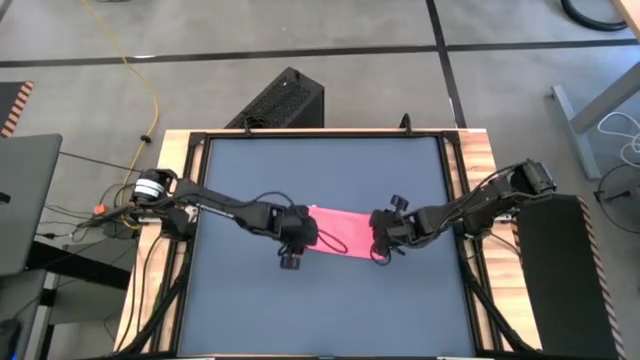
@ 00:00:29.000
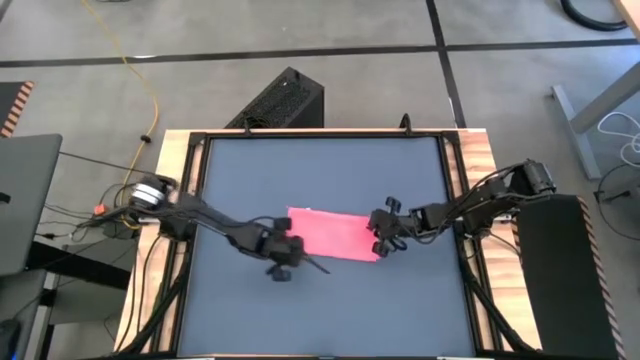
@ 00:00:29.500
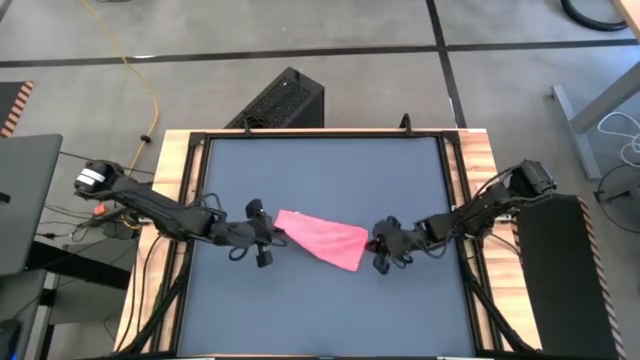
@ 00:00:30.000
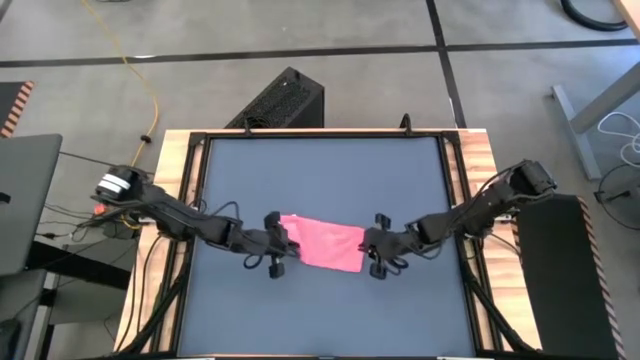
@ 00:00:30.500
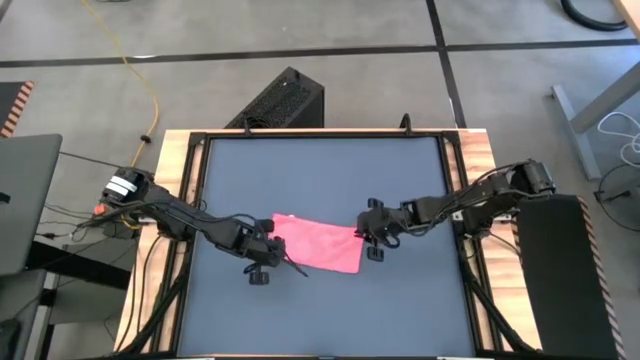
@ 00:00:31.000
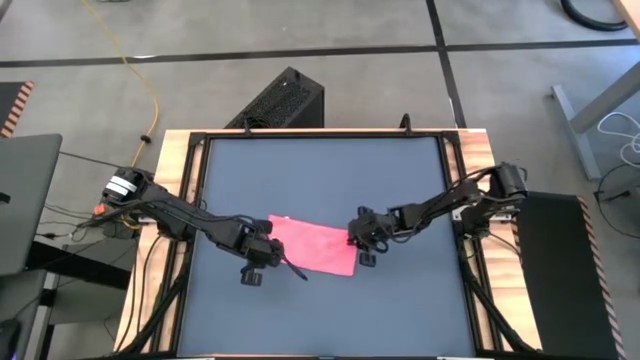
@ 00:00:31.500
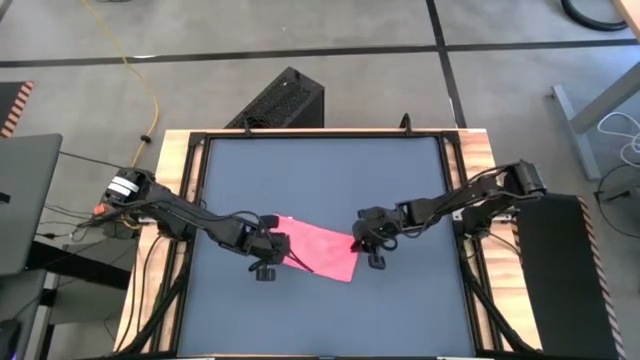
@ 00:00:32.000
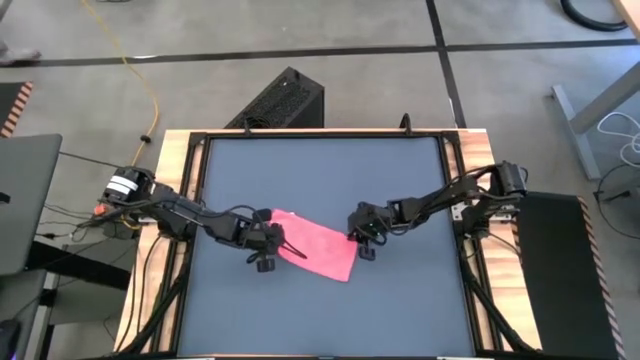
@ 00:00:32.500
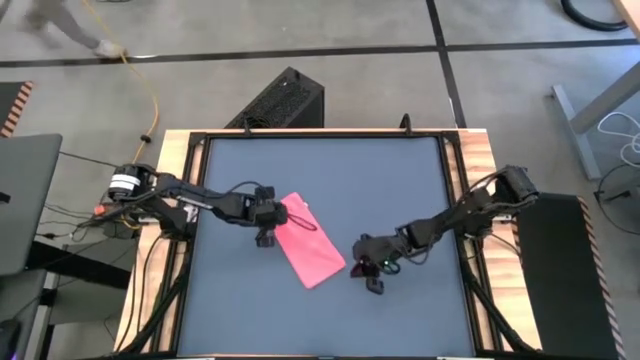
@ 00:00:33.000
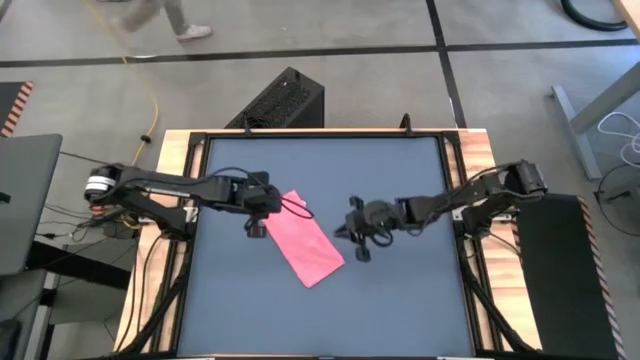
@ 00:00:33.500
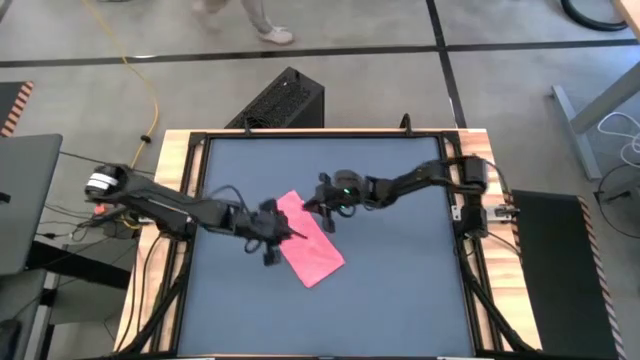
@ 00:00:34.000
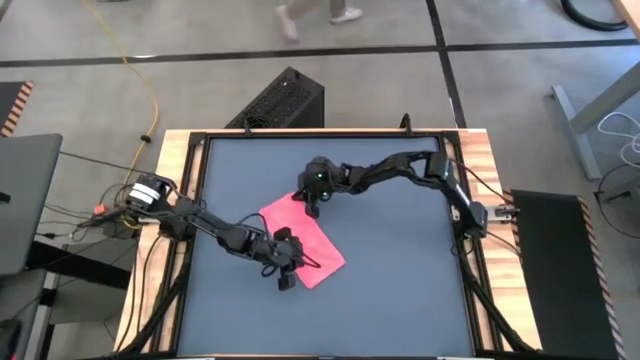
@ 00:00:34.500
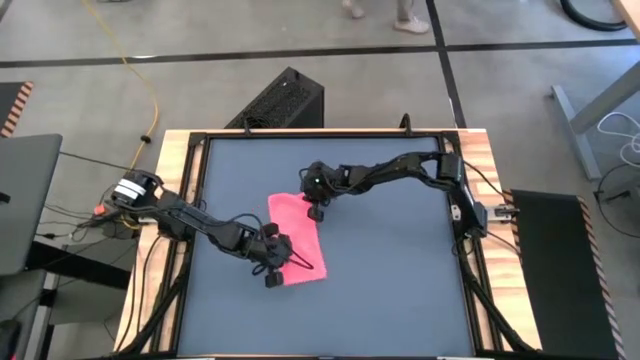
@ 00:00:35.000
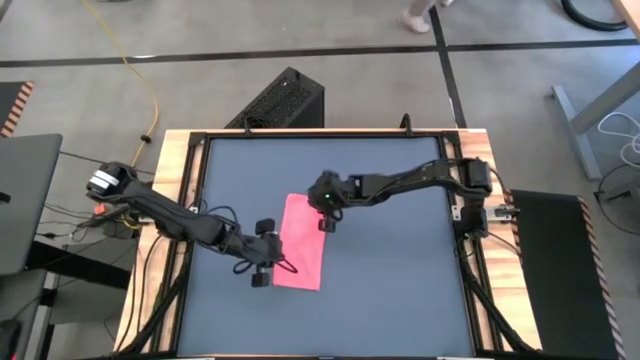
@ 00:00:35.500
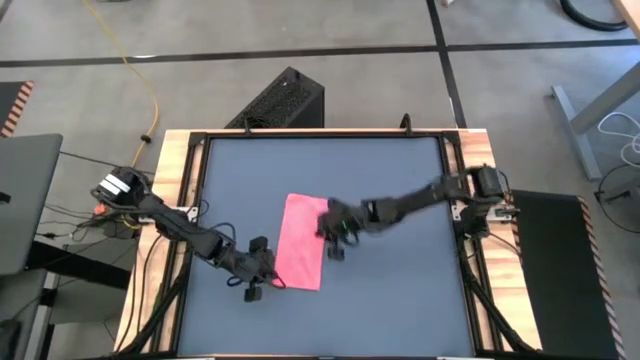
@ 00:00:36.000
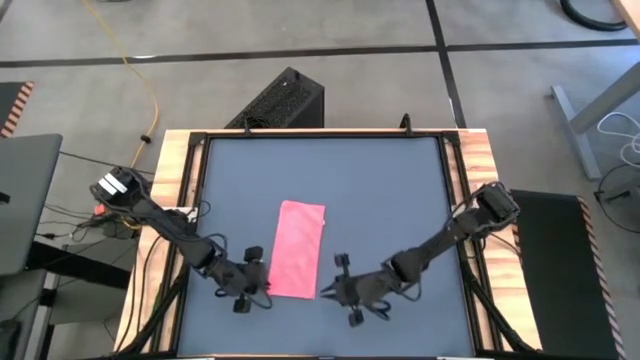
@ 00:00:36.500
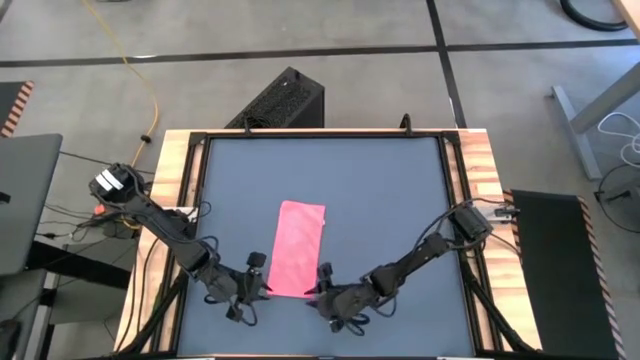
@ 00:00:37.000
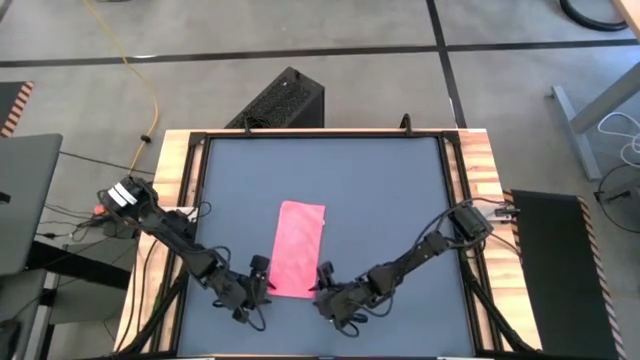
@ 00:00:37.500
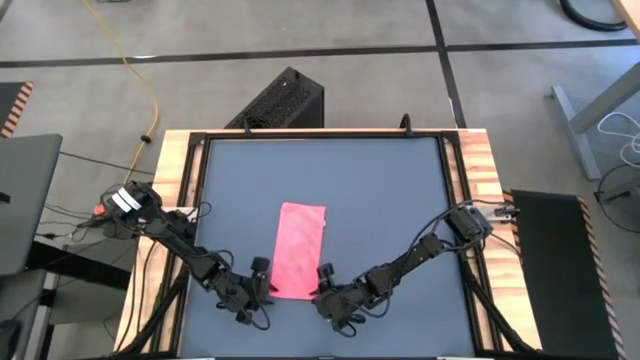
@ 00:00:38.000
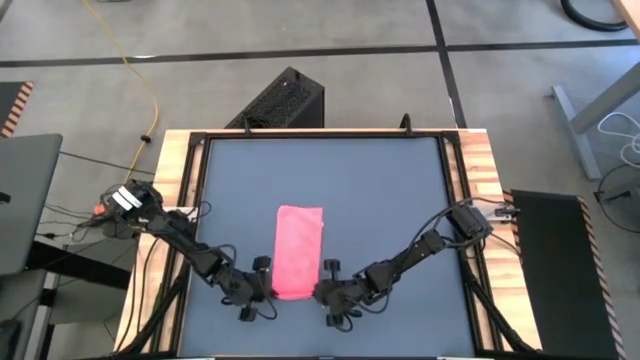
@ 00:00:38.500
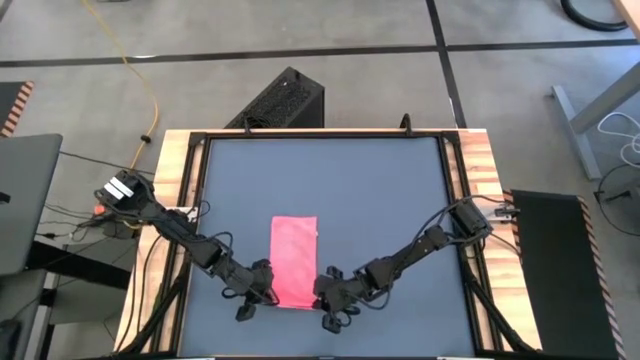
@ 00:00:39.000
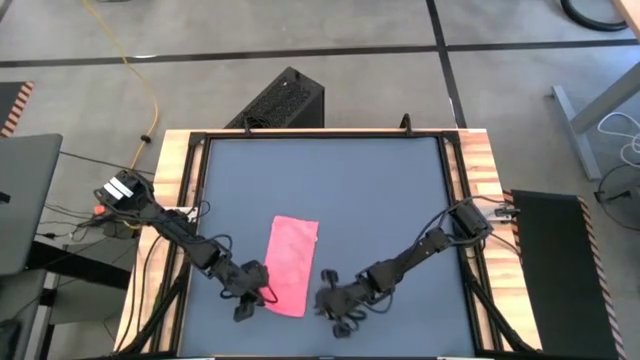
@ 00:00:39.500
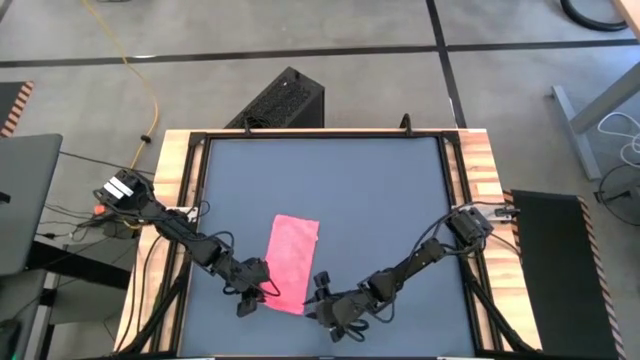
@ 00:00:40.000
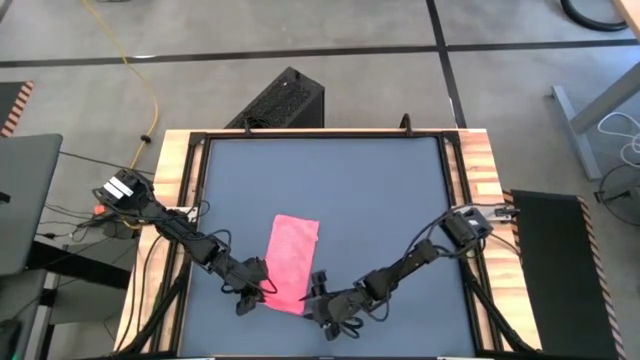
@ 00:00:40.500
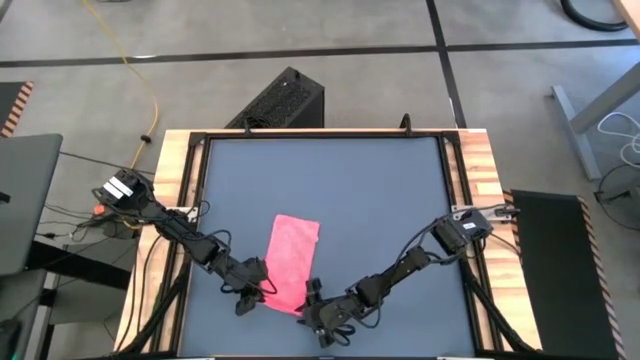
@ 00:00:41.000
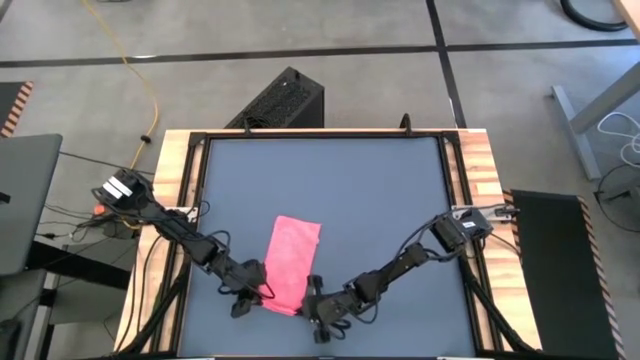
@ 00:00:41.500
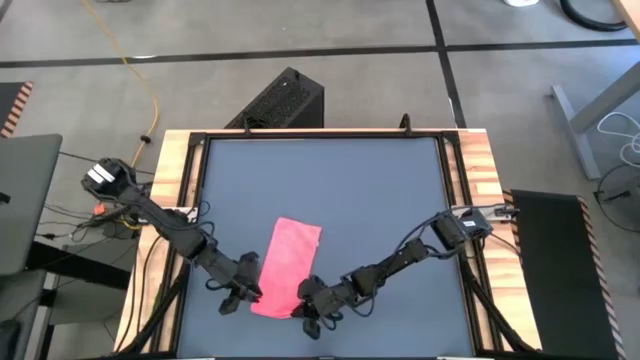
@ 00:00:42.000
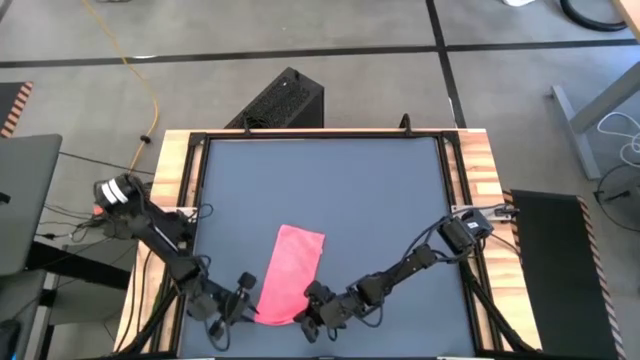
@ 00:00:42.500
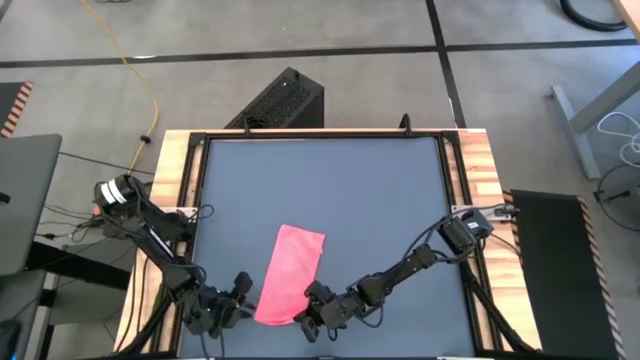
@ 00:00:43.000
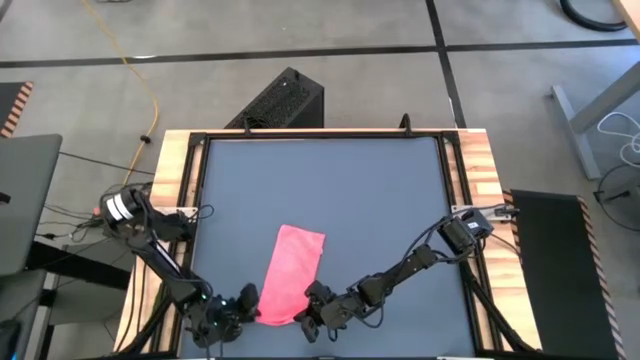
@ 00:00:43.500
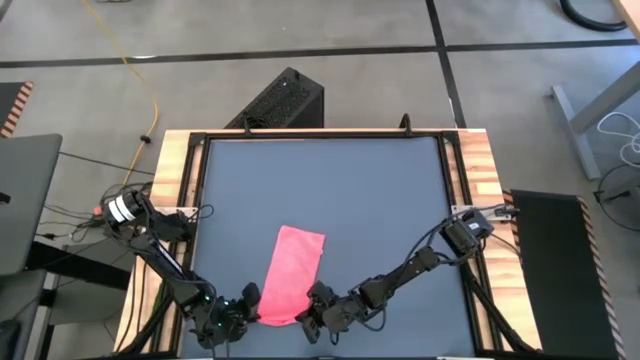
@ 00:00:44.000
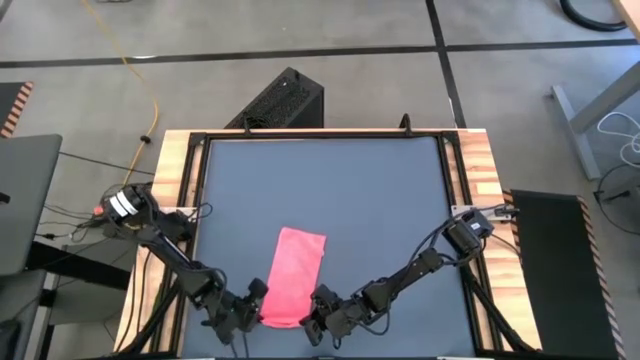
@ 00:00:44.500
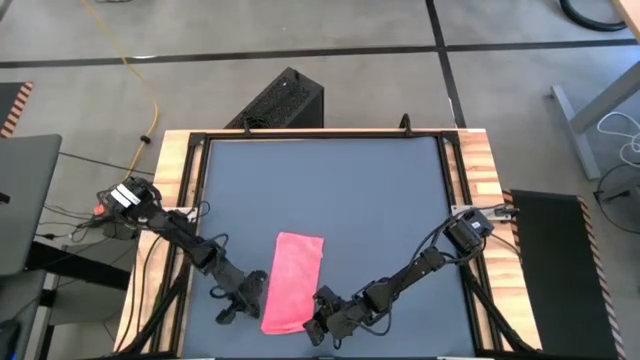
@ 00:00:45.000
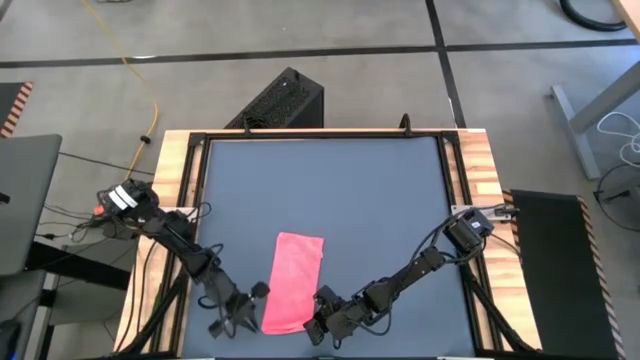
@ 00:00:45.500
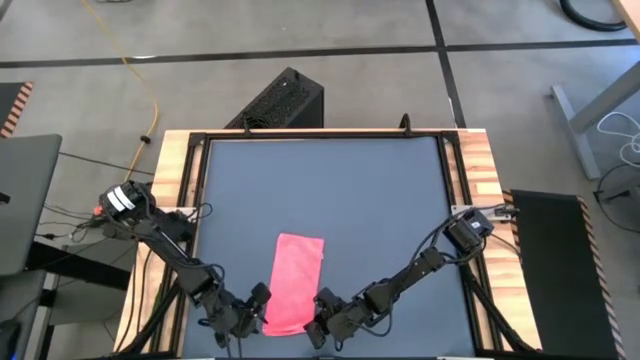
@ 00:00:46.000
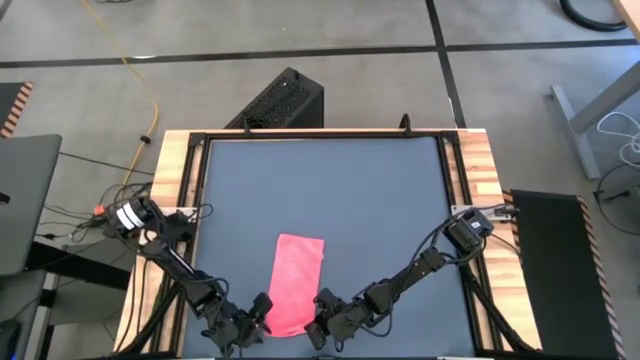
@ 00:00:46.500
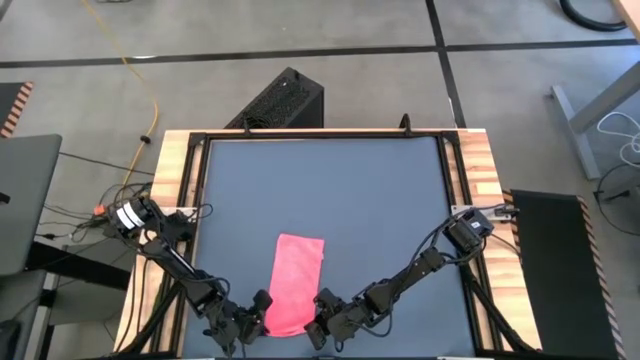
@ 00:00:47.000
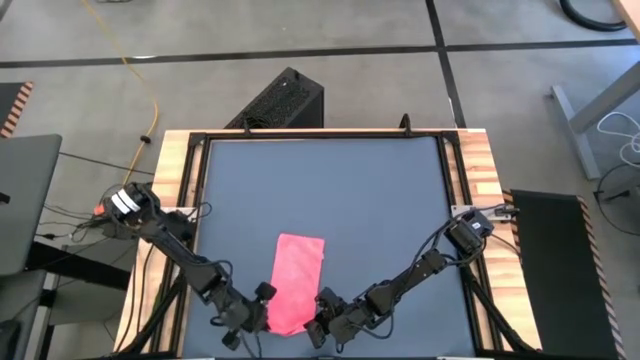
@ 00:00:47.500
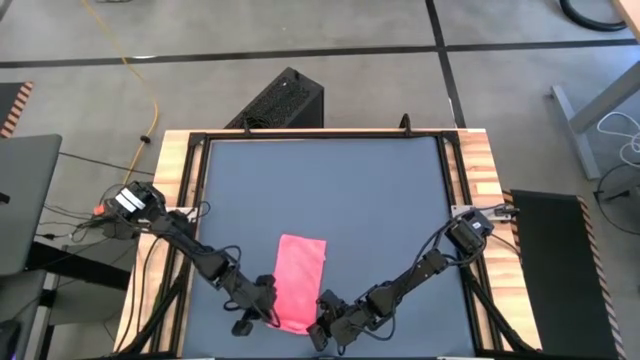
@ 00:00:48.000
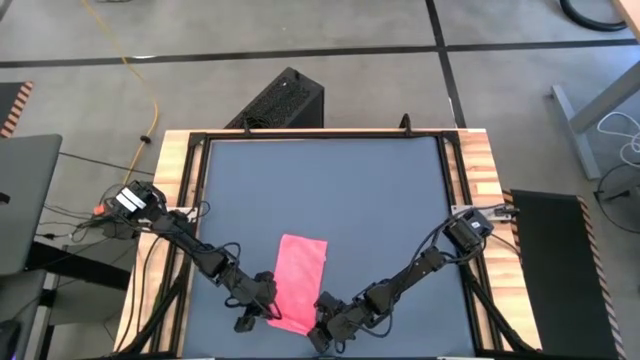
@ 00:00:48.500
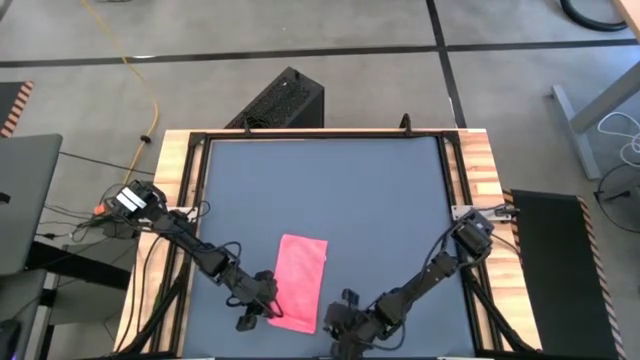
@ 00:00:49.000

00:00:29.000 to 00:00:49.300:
Task: Roll towel
Roll the pink microfiber towel
